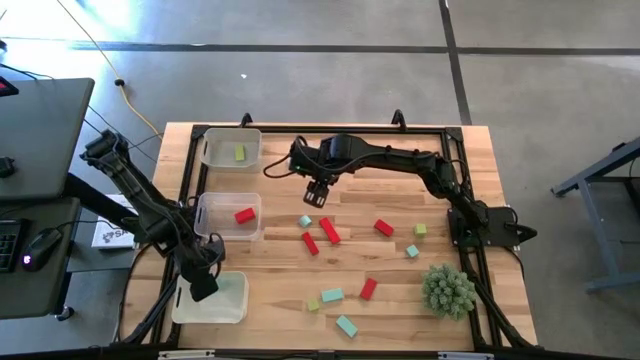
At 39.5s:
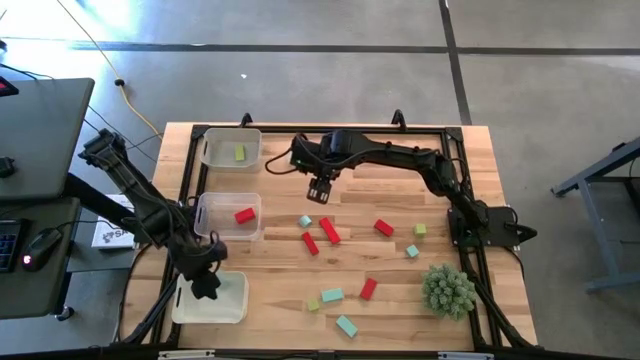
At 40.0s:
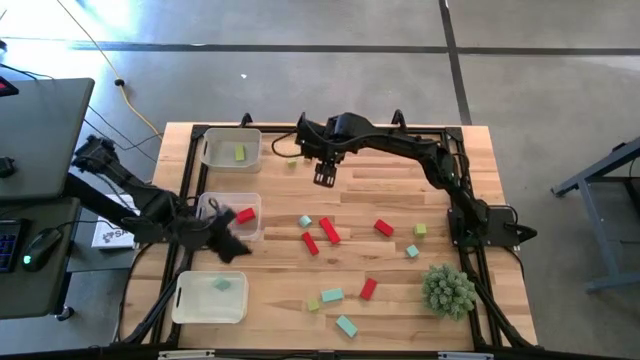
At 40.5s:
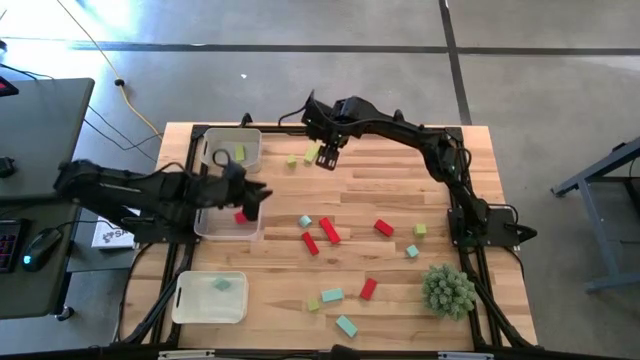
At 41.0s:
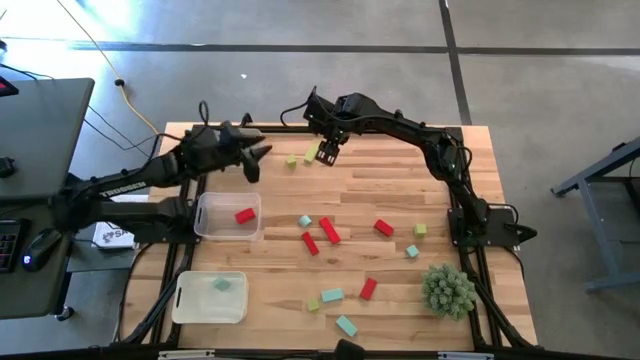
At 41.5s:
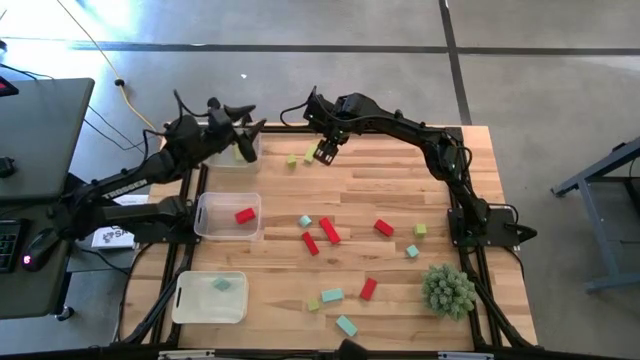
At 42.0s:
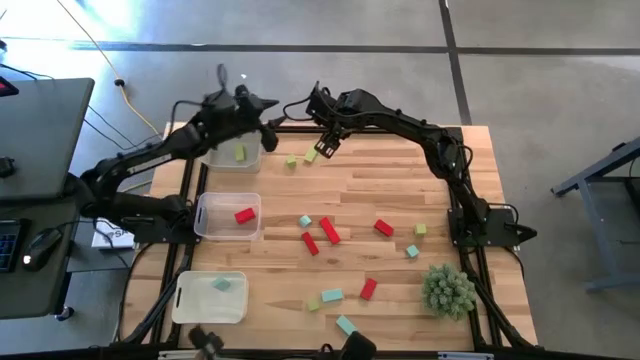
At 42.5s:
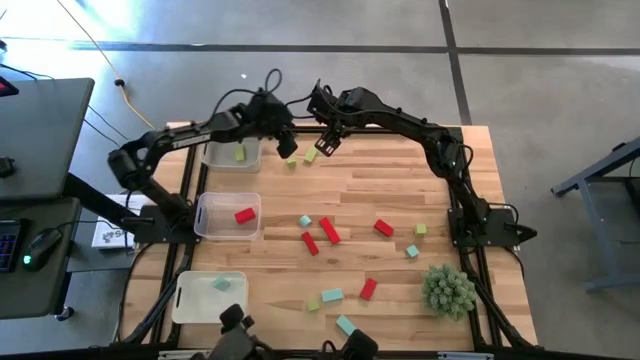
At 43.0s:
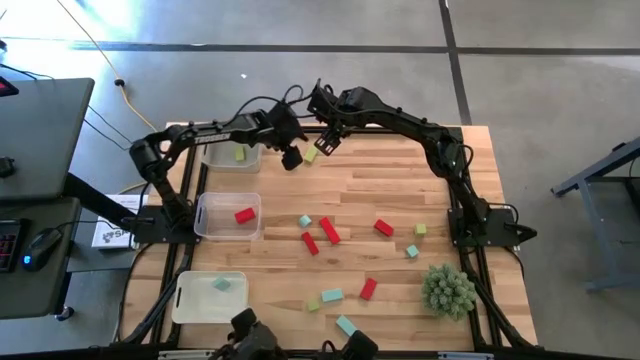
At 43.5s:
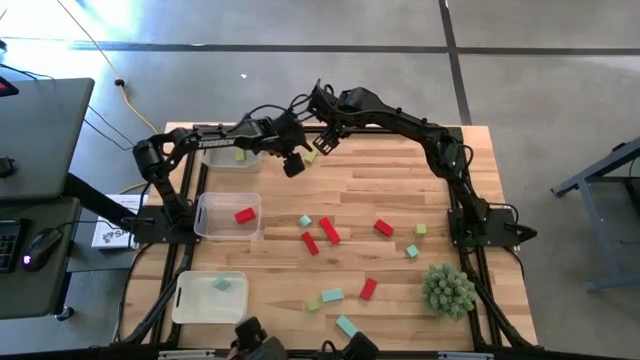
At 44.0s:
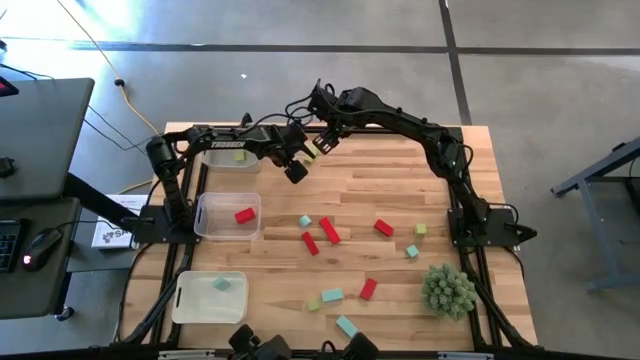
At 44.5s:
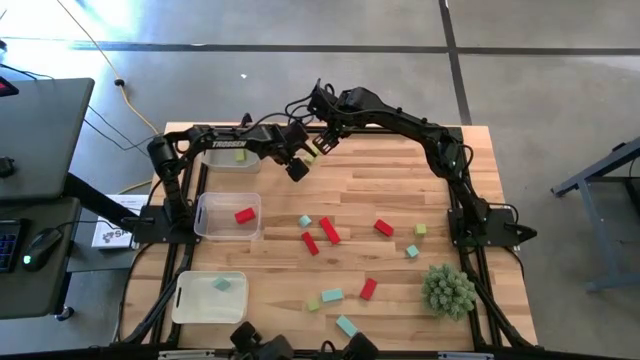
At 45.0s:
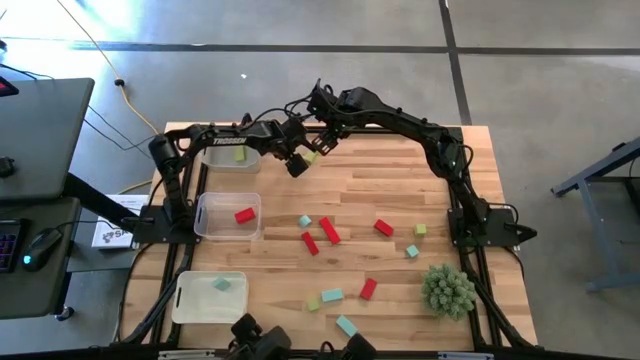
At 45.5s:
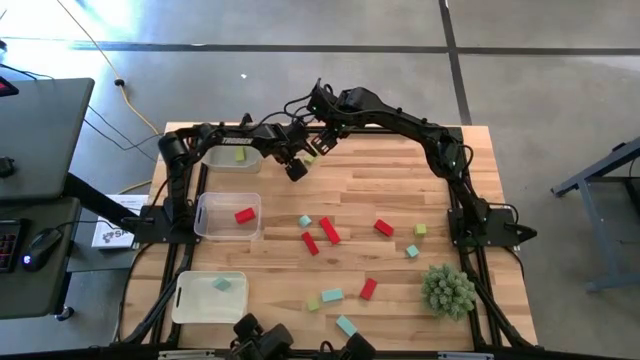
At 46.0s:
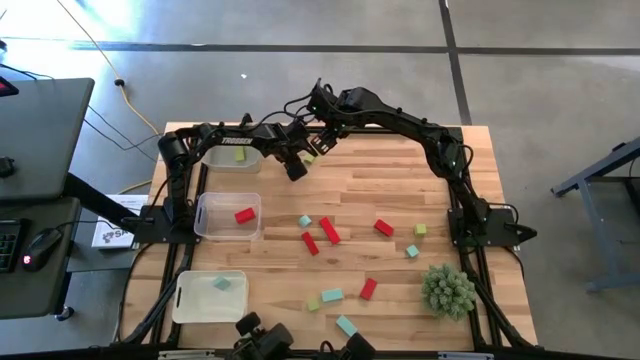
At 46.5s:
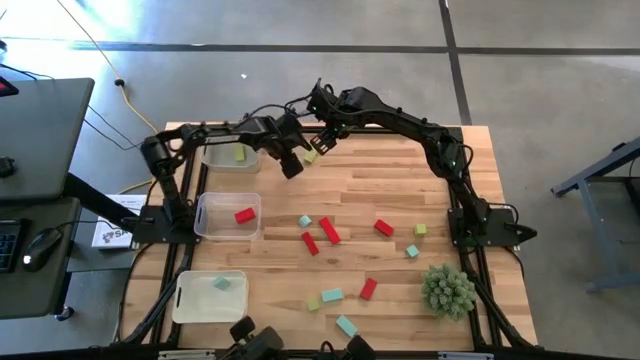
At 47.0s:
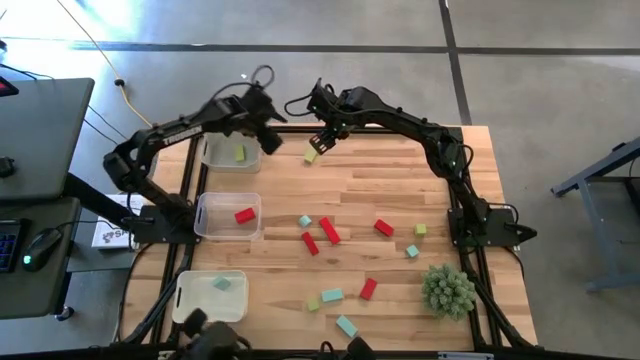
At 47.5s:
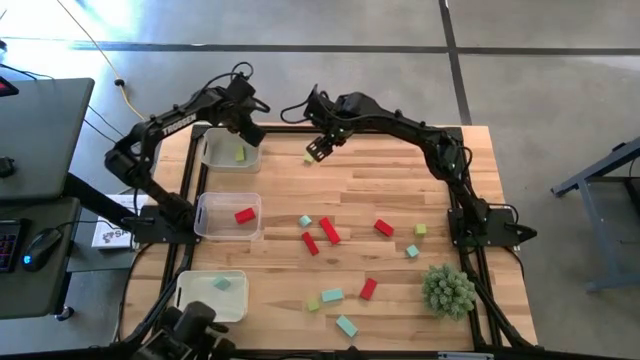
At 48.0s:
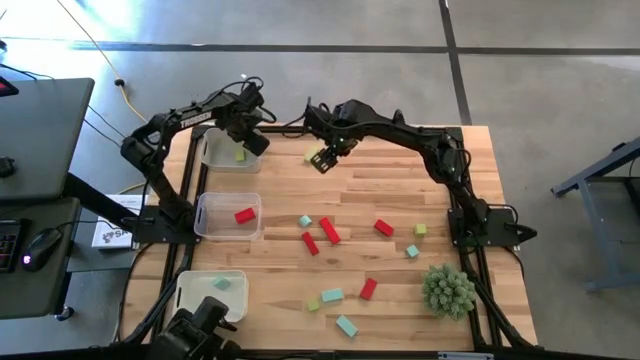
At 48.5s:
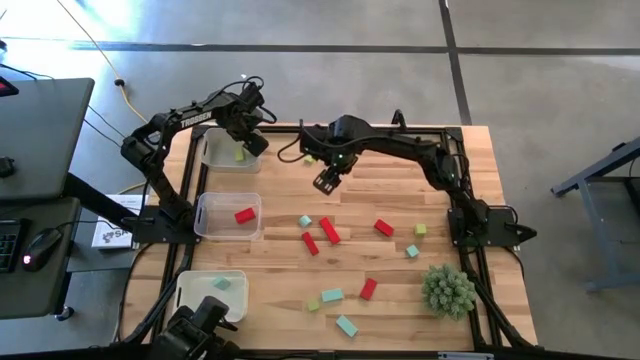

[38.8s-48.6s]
Task: Sort & place blocks by color
Put the light green block into the gray bin

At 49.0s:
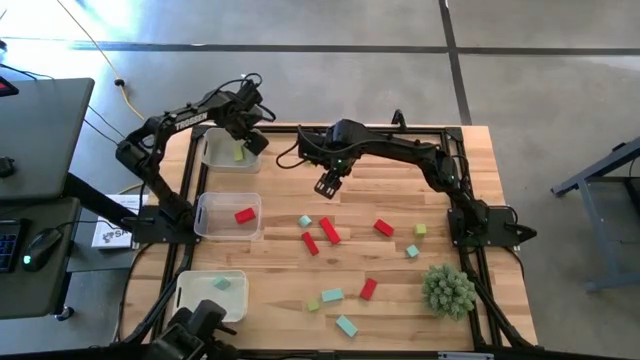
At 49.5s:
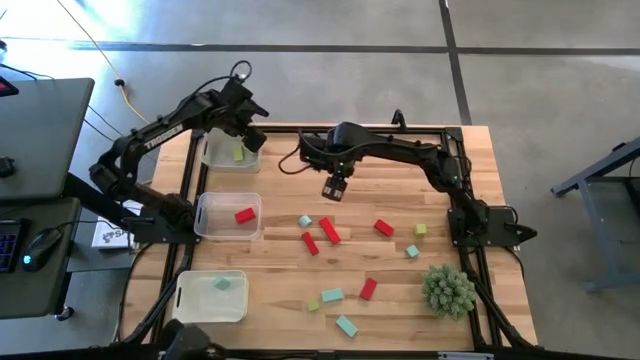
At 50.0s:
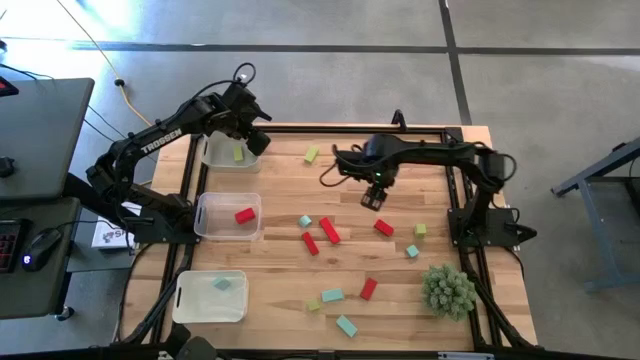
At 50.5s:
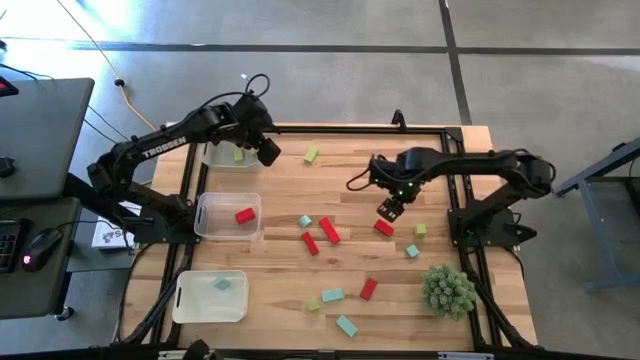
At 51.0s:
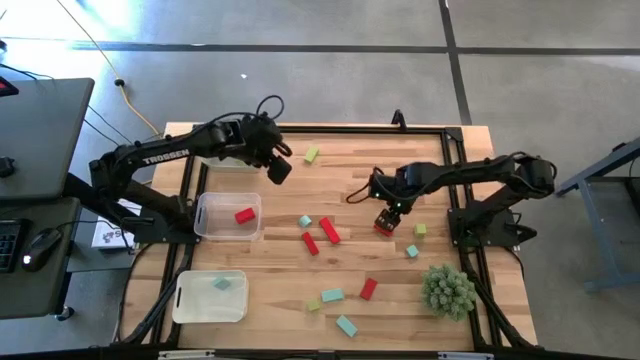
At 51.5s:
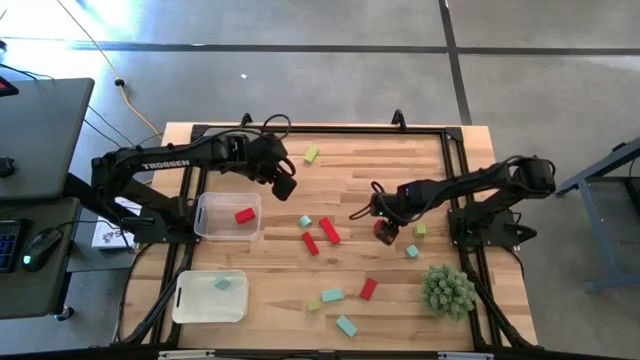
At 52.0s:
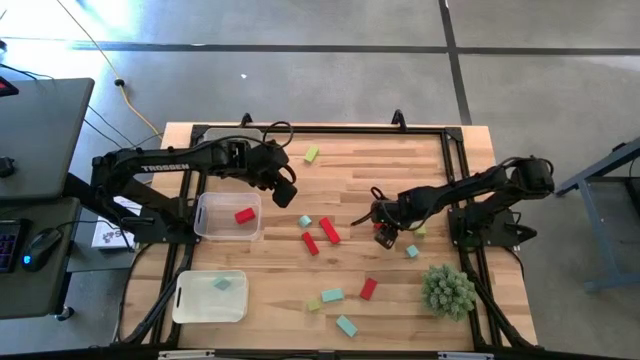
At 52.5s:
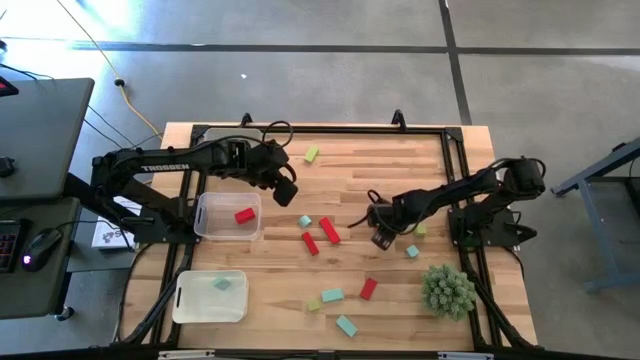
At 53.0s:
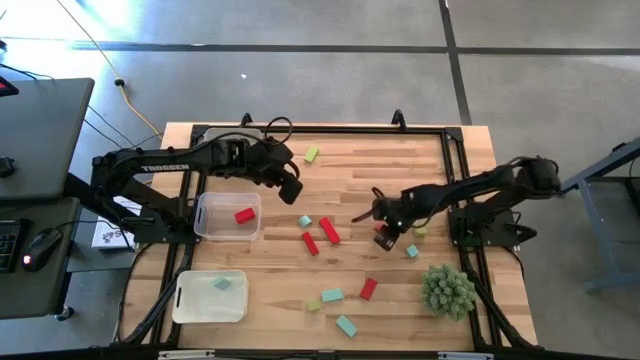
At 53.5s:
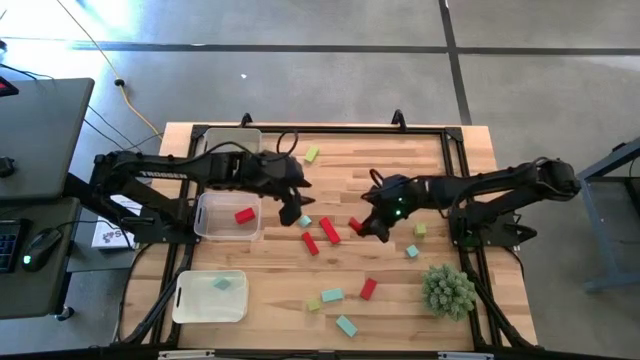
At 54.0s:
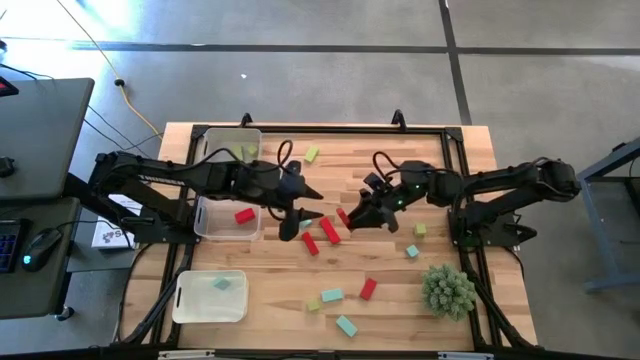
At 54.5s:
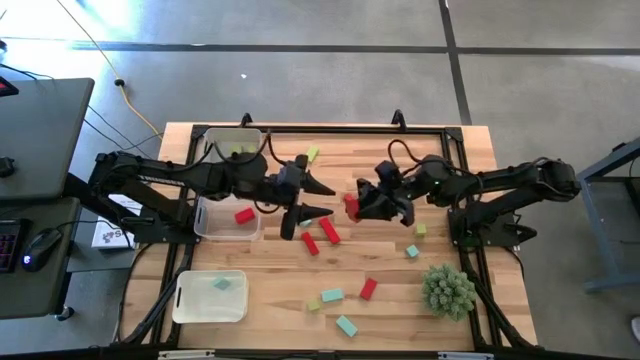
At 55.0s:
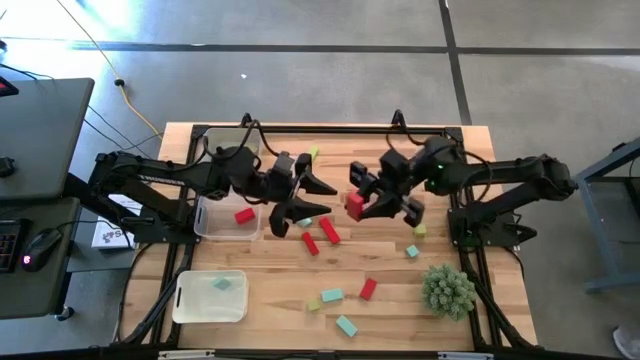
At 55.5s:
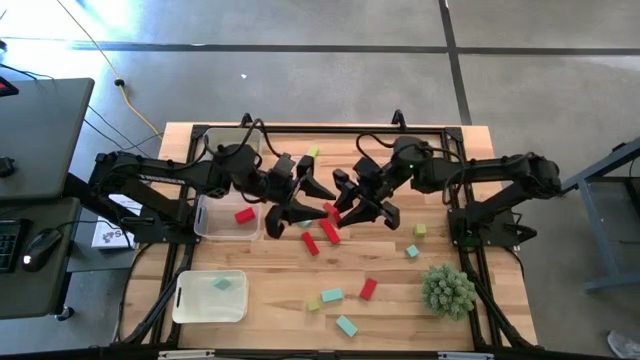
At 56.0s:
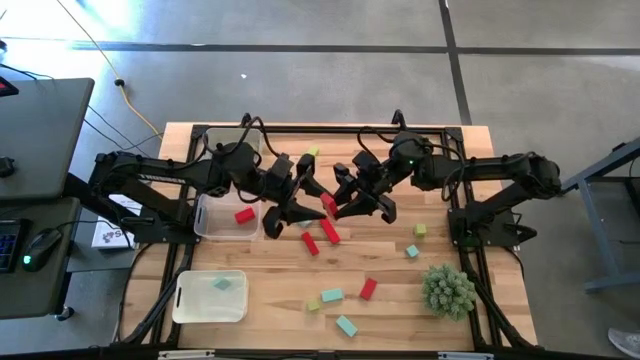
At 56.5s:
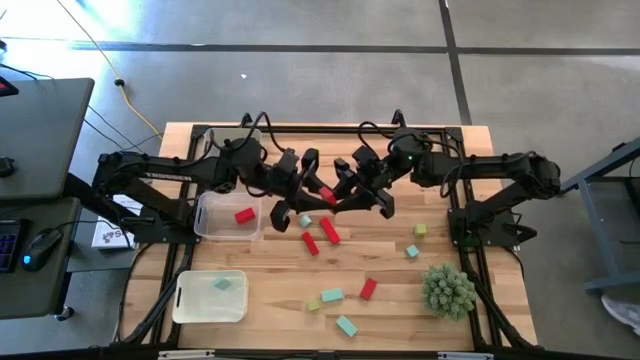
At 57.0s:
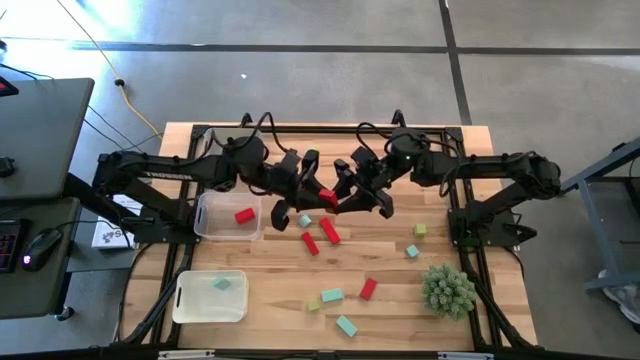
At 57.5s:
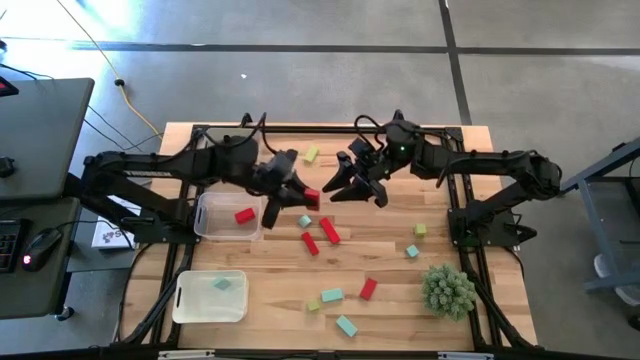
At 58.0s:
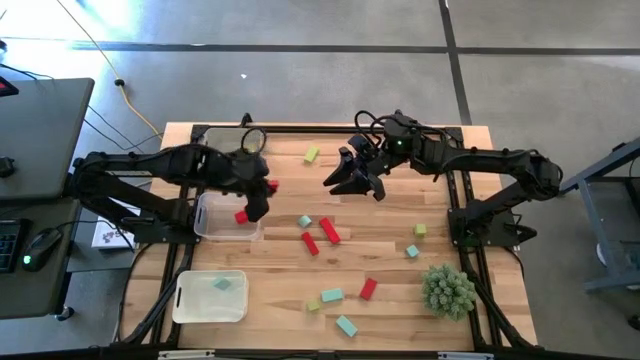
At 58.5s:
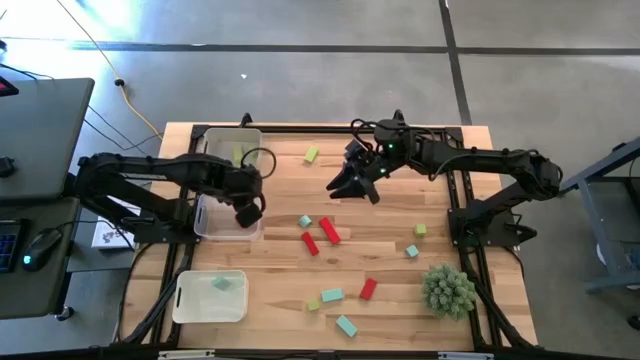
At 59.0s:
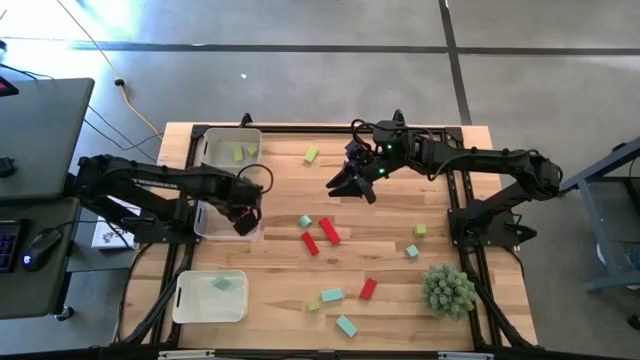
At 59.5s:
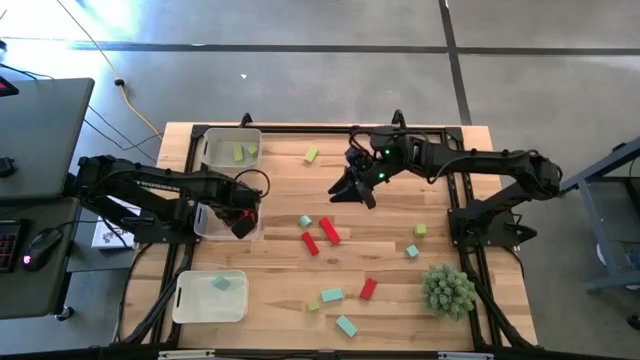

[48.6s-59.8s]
Put the red block into the transparent bin

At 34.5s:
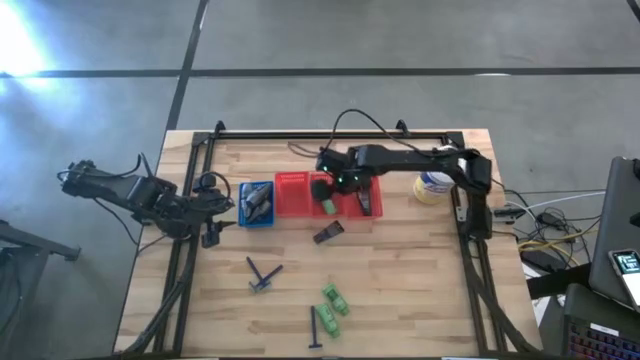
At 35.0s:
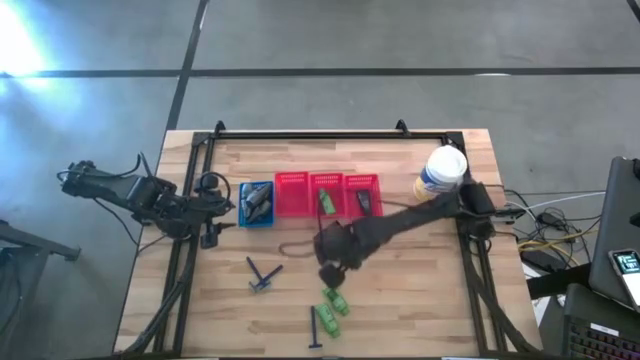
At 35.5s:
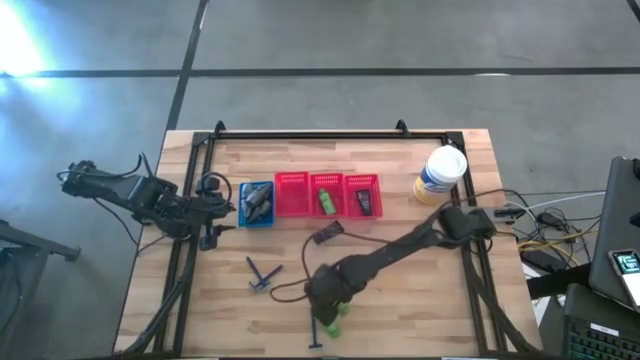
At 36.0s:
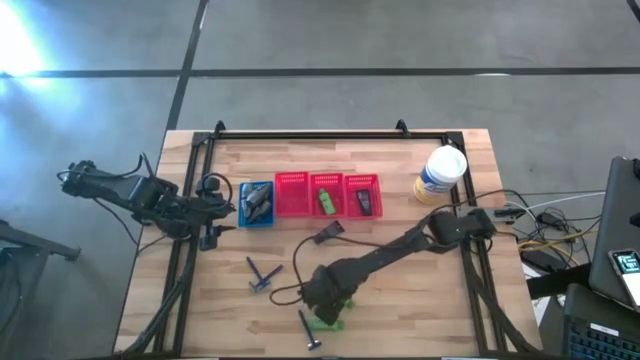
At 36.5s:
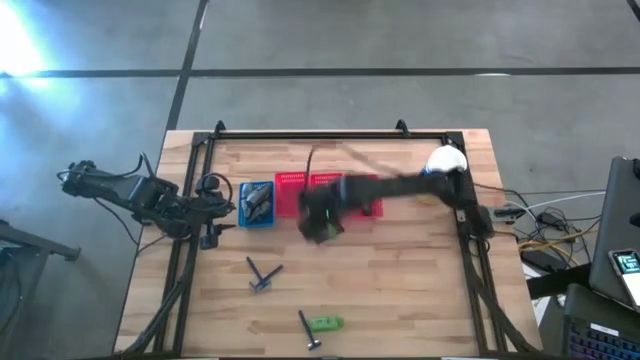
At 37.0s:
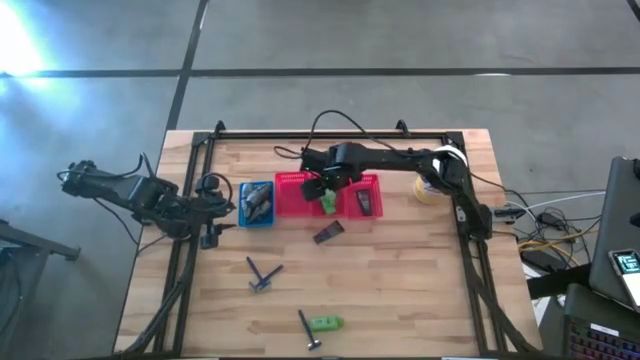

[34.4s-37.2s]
Task: Pick & Place Travel size toiletries
Put the top green shampoo into the middle red bin
